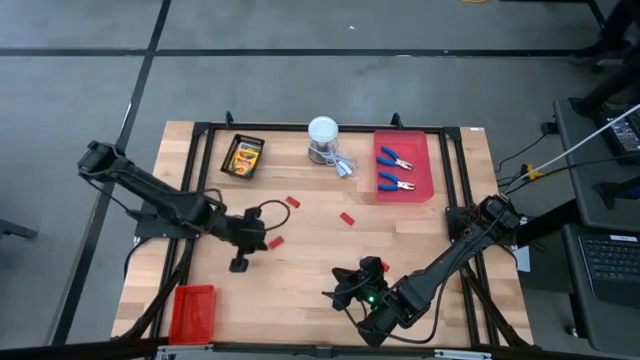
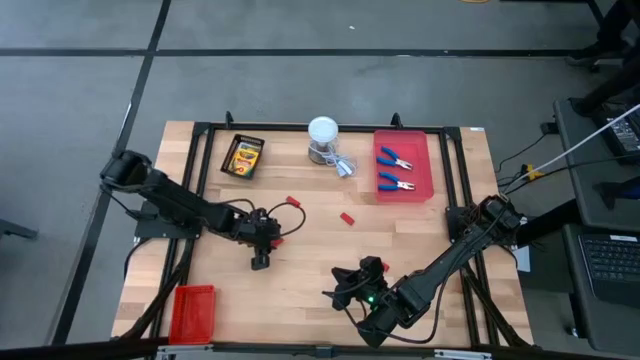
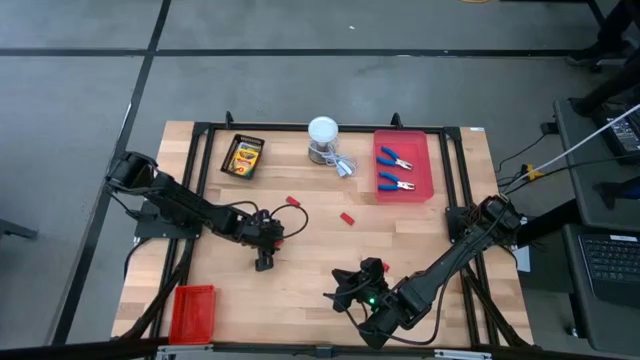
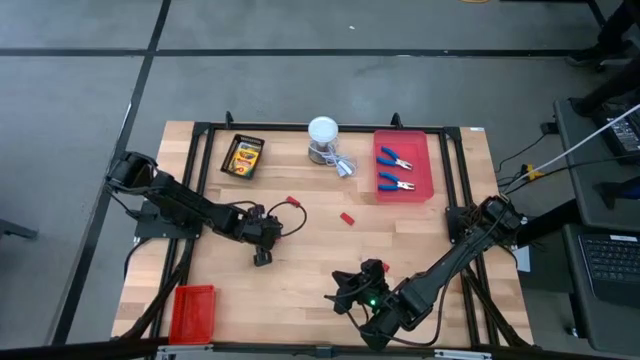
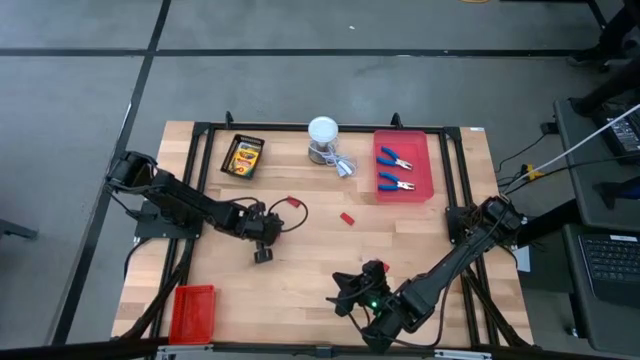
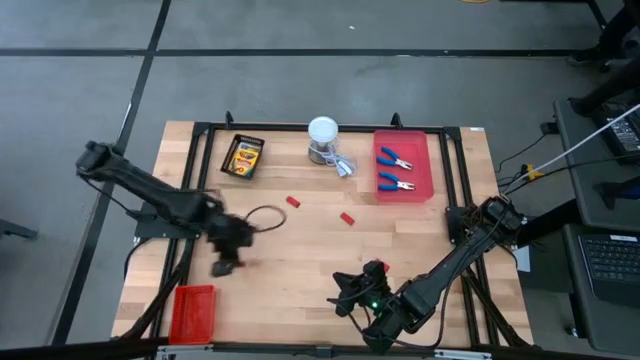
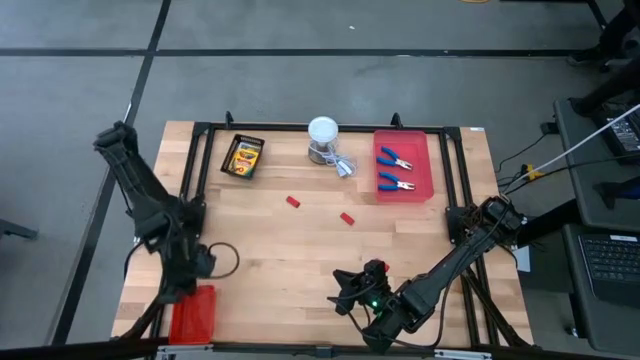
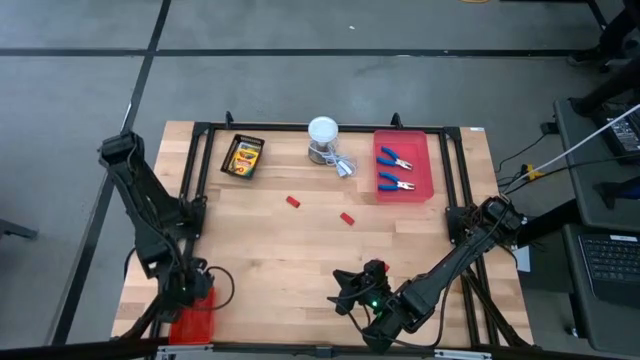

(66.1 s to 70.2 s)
Task: Pick & Place School Supplies
Put the red eraser into the red bin

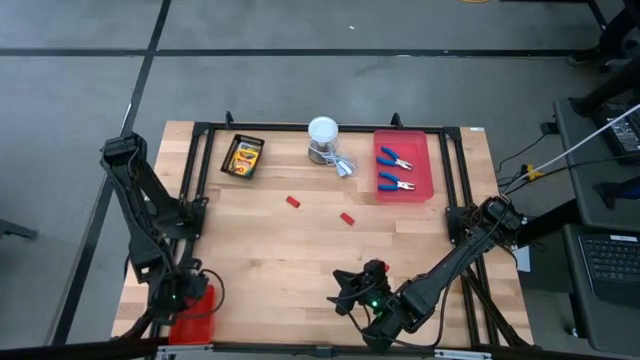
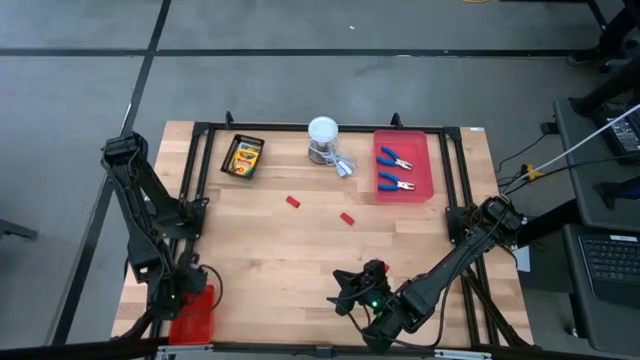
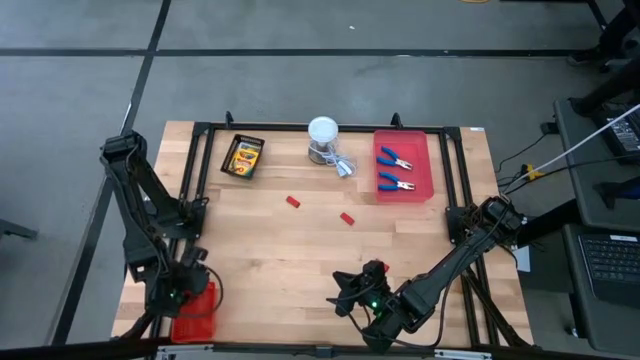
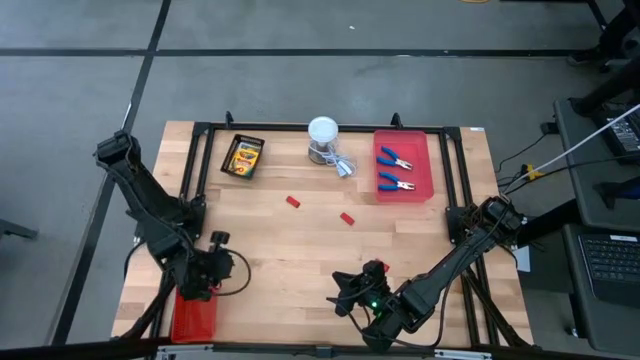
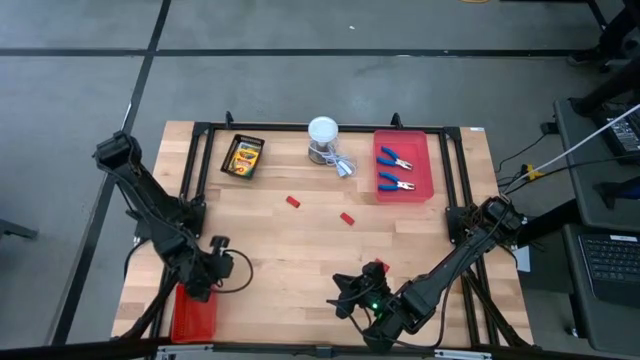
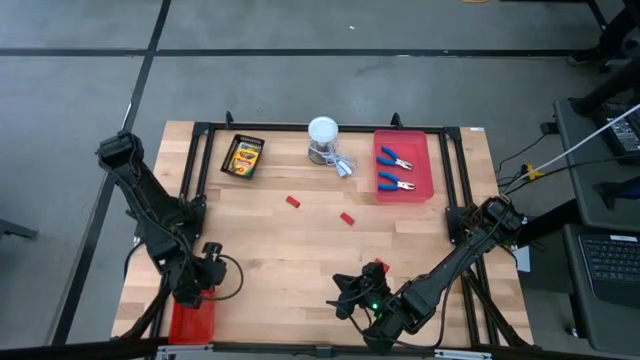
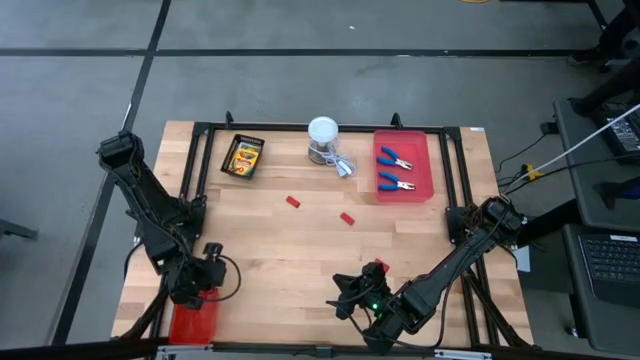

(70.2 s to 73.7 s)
Adjust the red bin

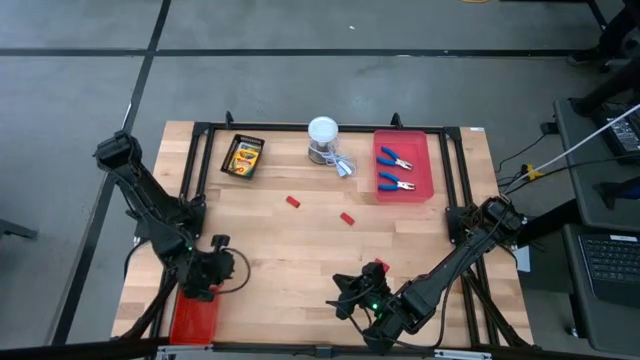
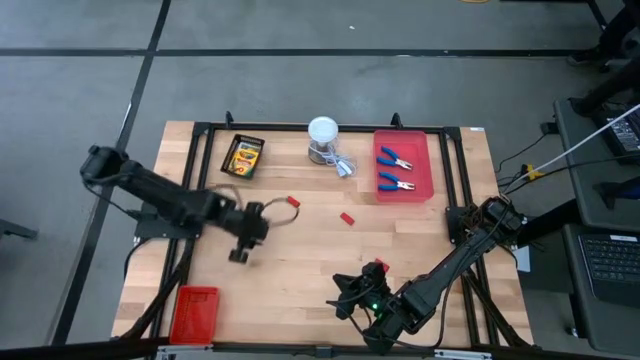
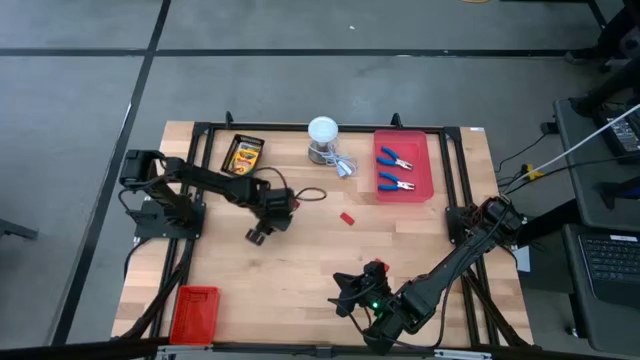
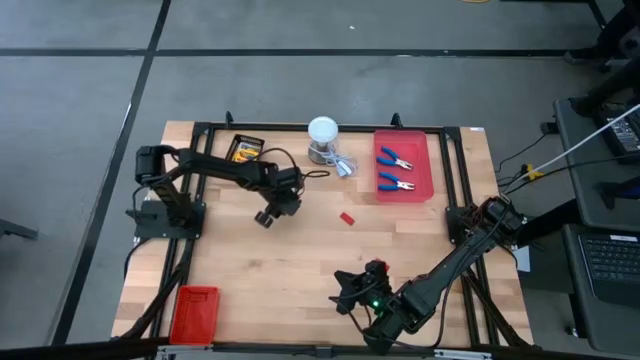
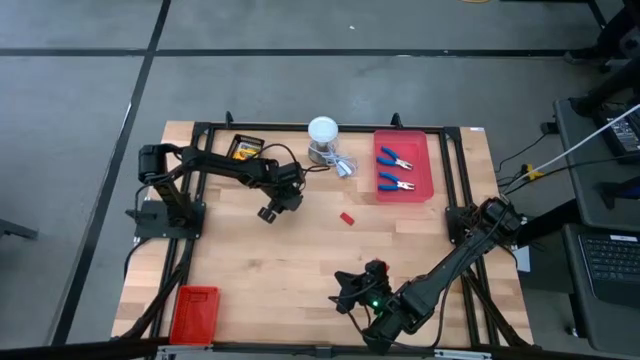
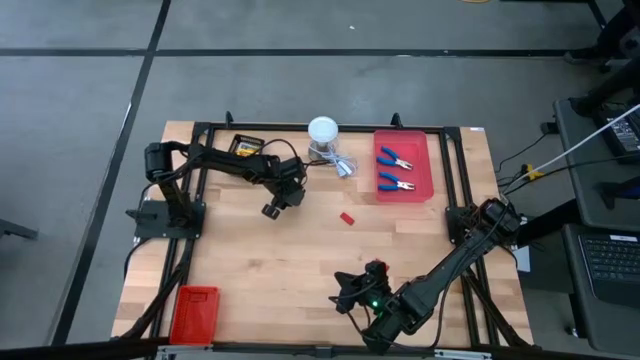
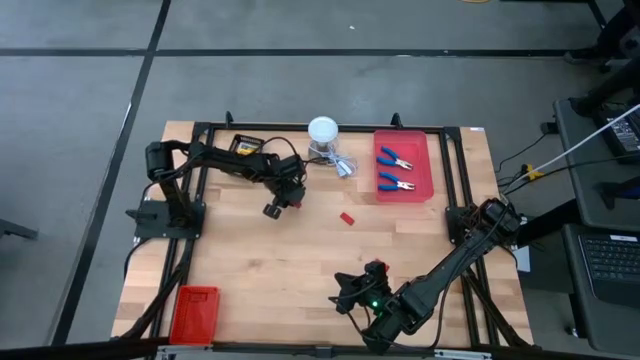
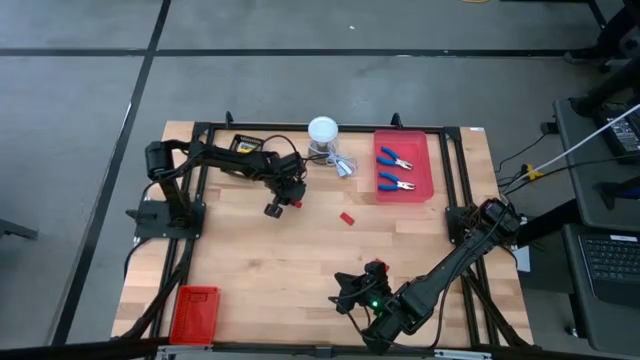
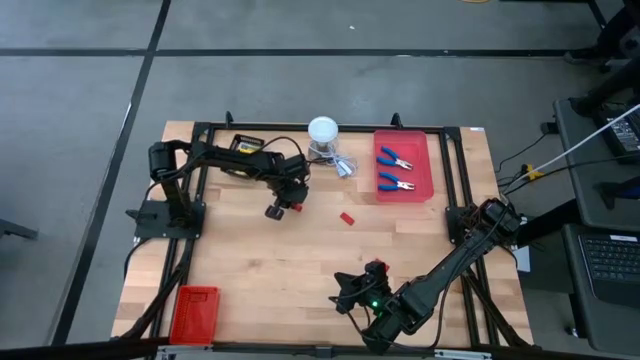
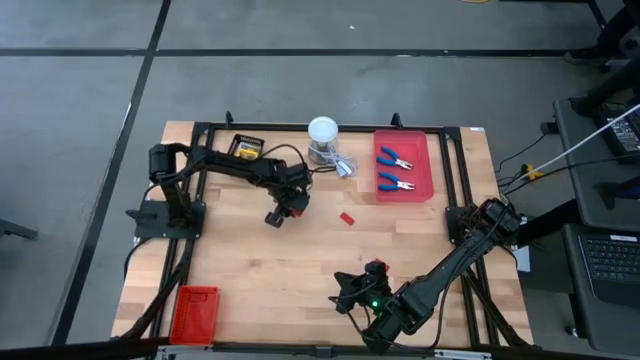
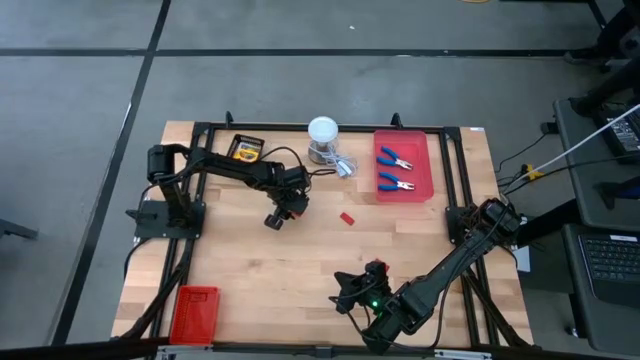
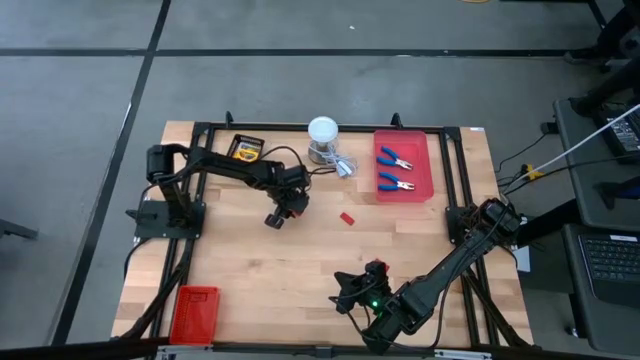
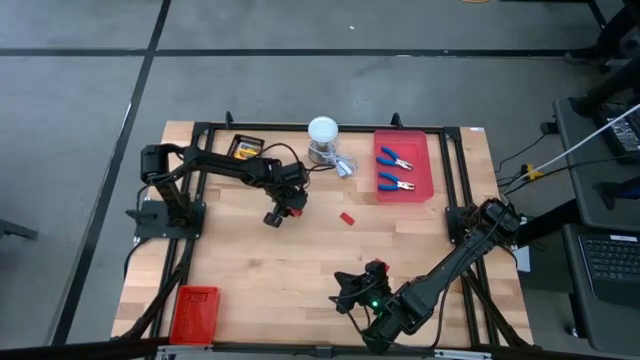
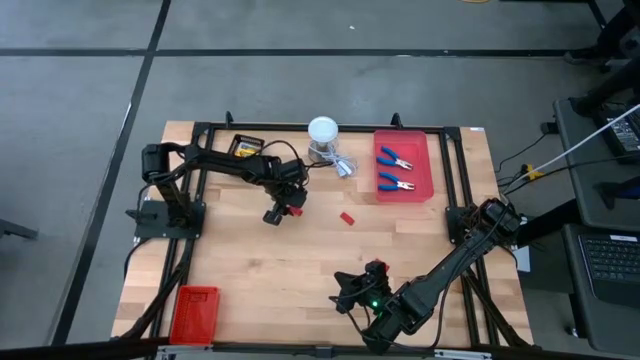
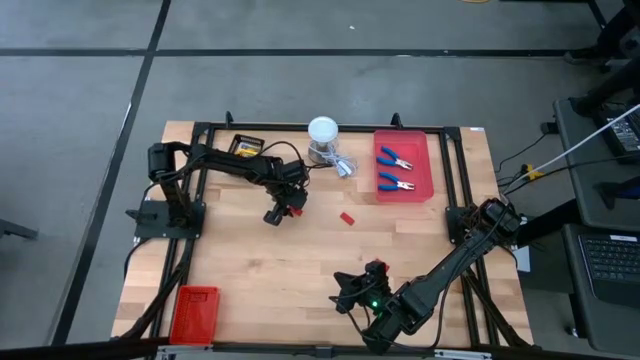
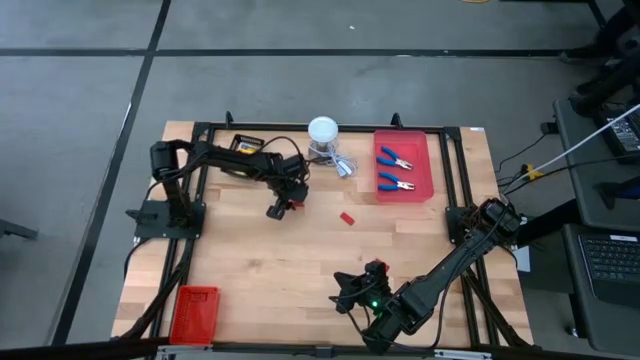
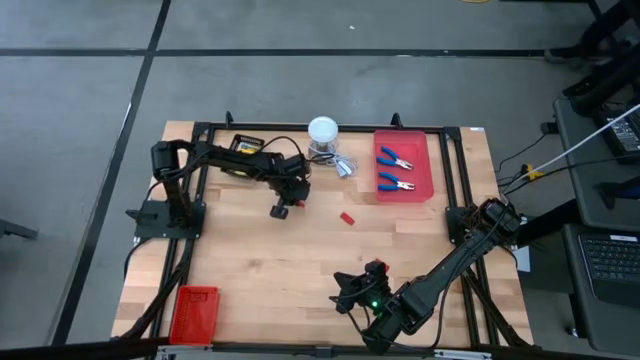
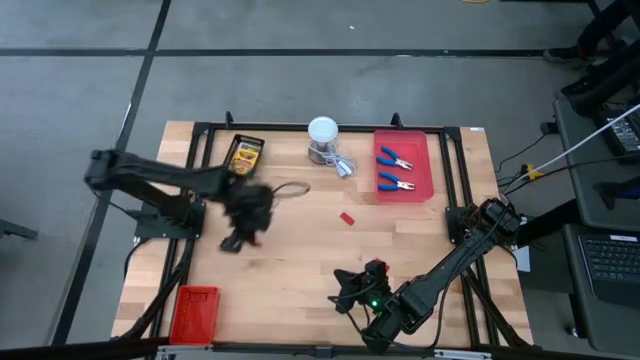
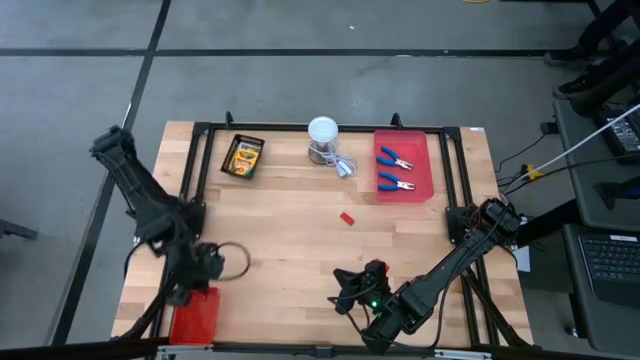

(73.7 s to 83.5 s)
Put the red eraser into the red bin

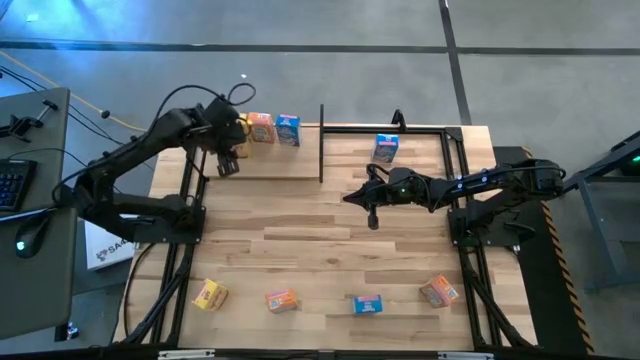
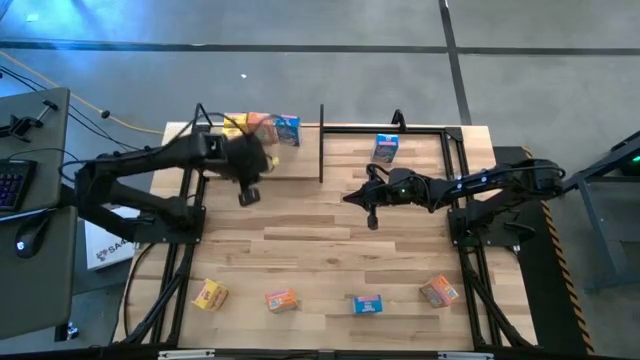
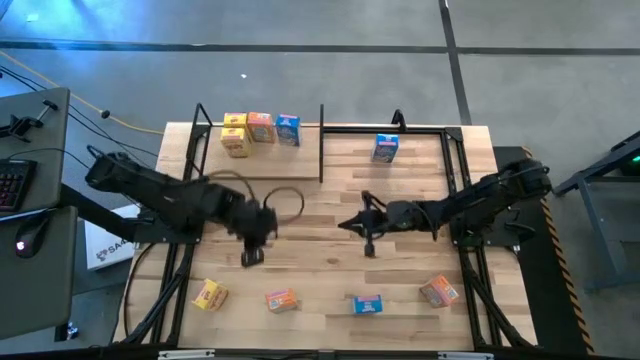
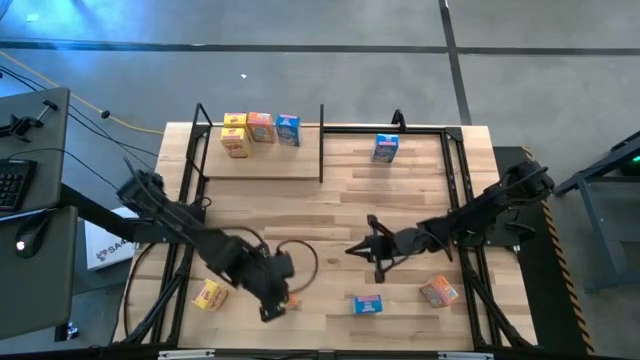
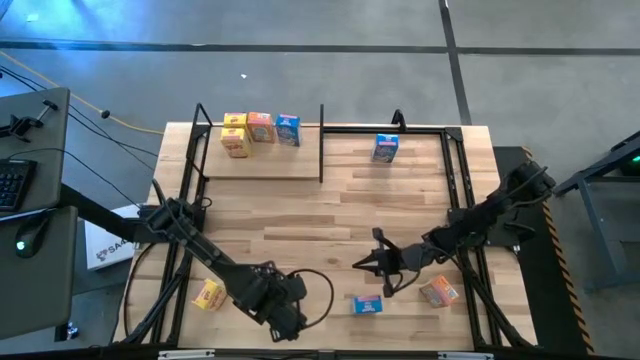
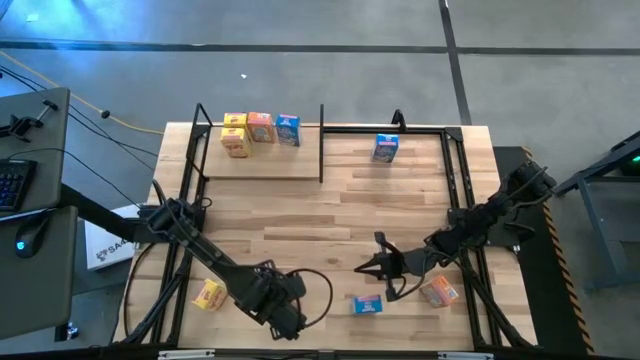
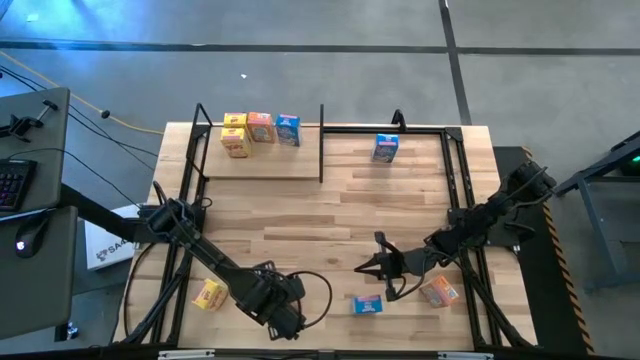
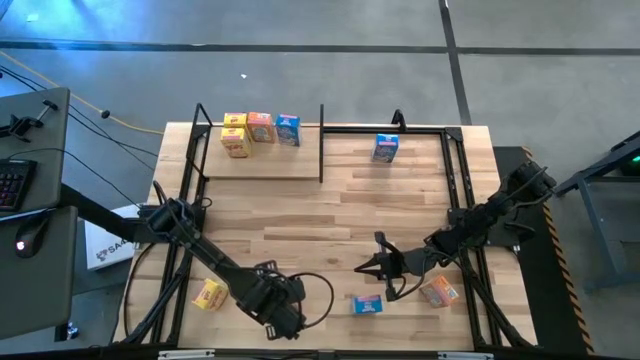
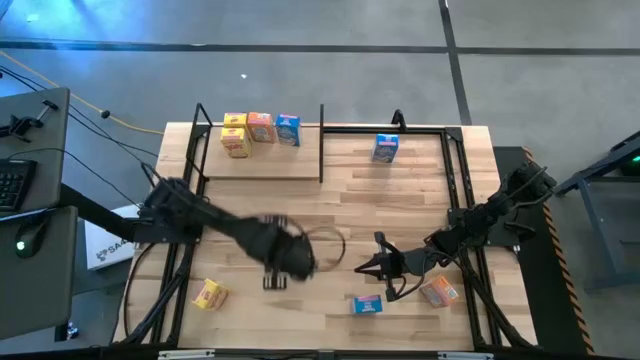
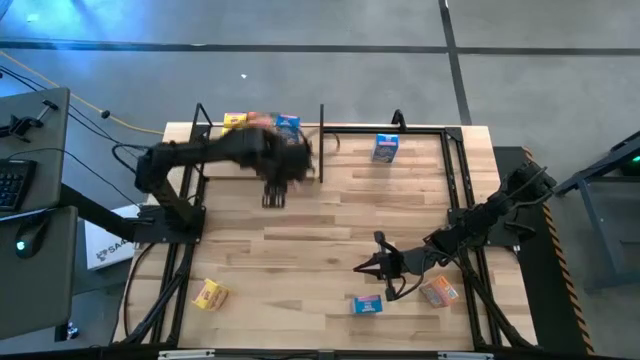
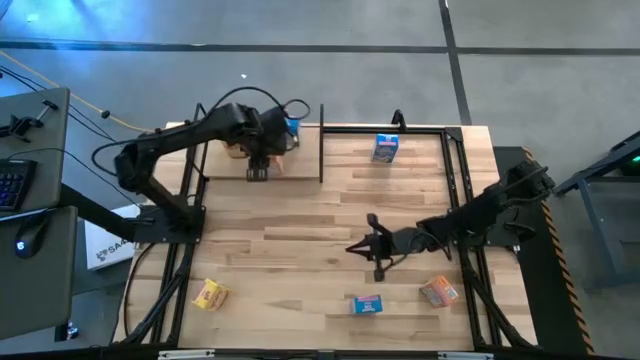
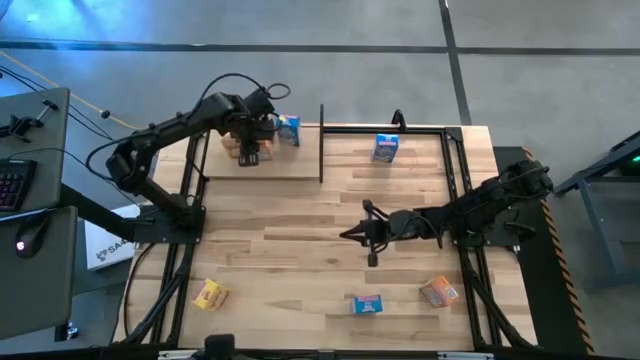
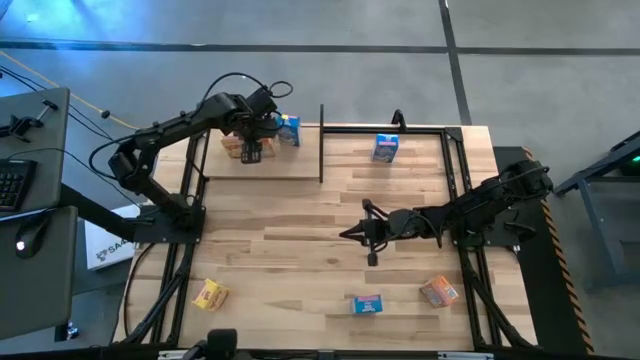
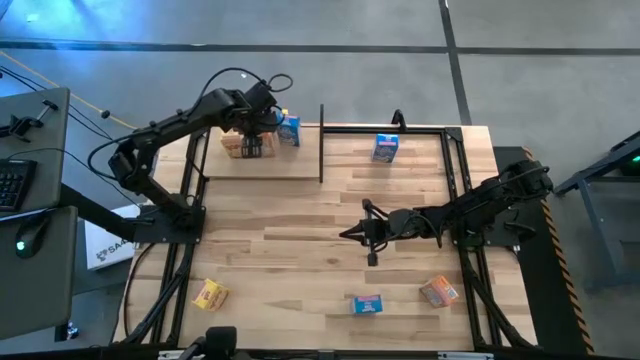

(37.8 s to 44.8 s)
Task: Stack cereal on shelf
Put the left orange cereal box on the shelf aligned with the other orange cereal box
